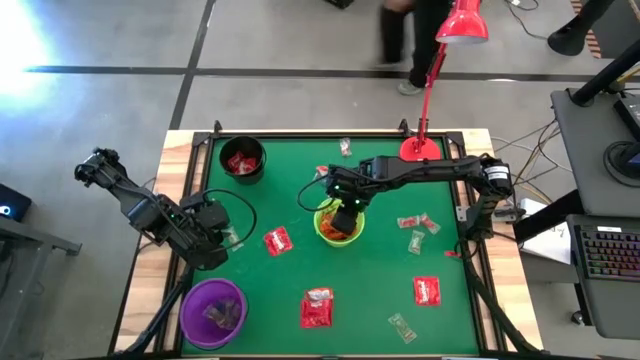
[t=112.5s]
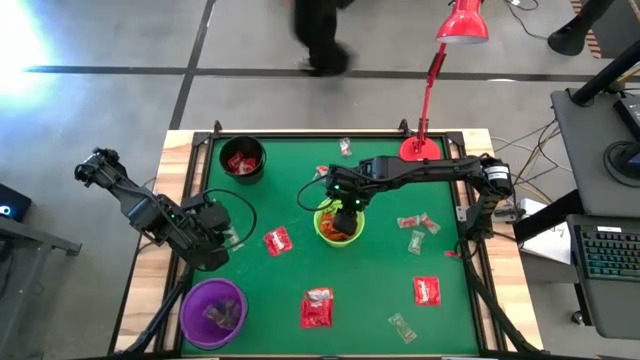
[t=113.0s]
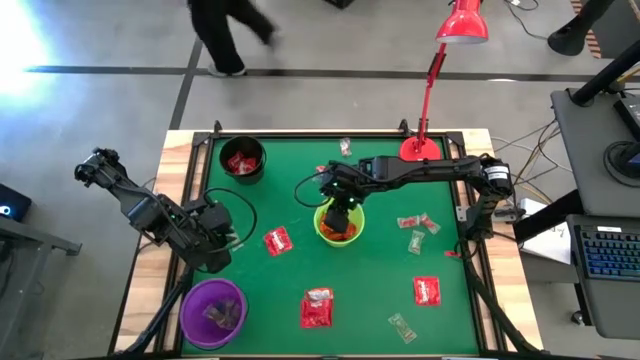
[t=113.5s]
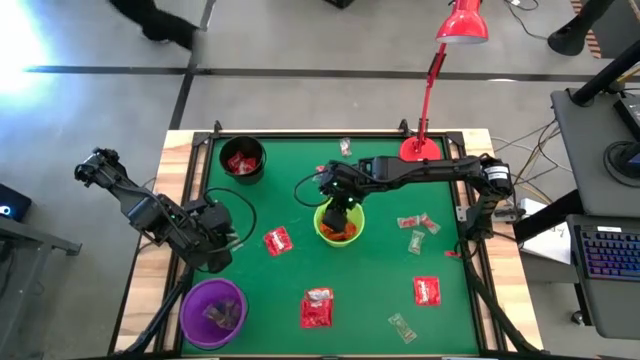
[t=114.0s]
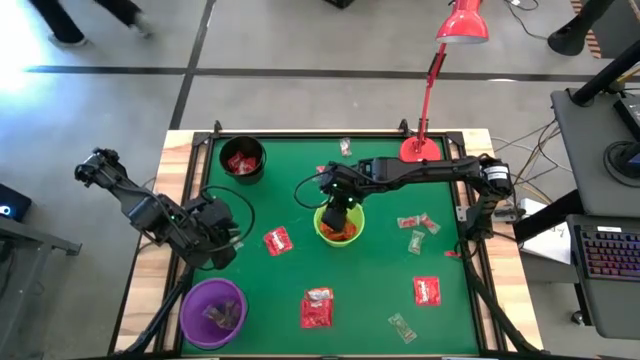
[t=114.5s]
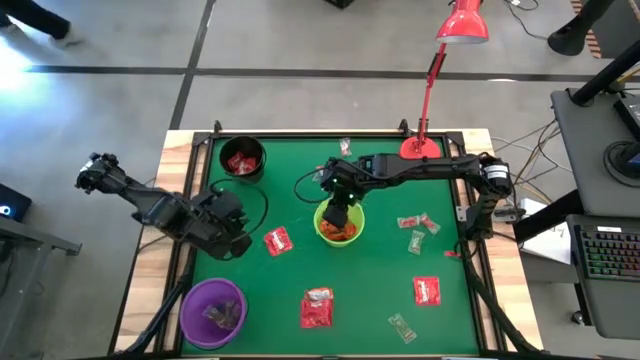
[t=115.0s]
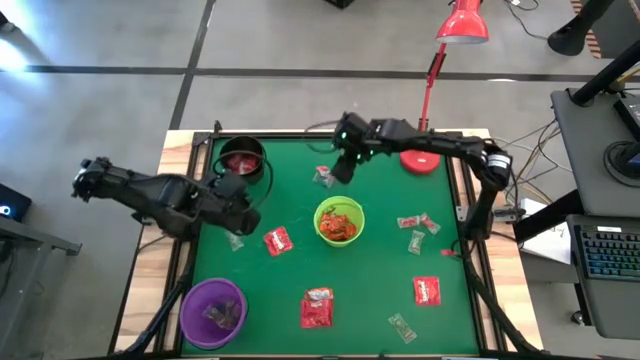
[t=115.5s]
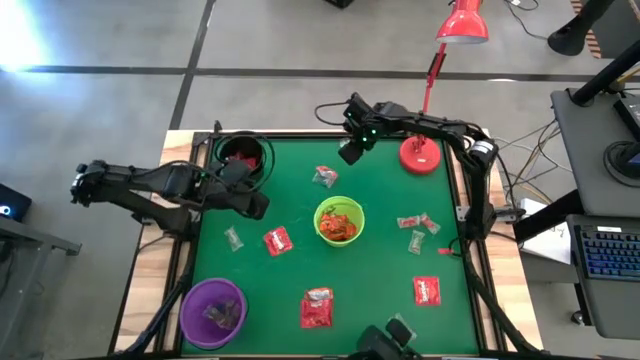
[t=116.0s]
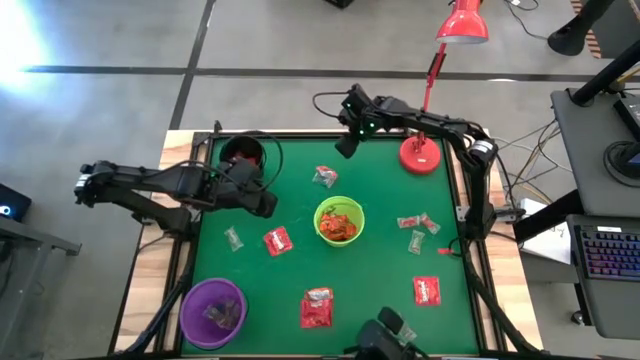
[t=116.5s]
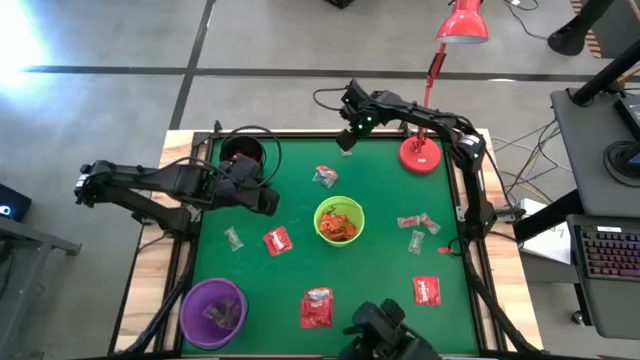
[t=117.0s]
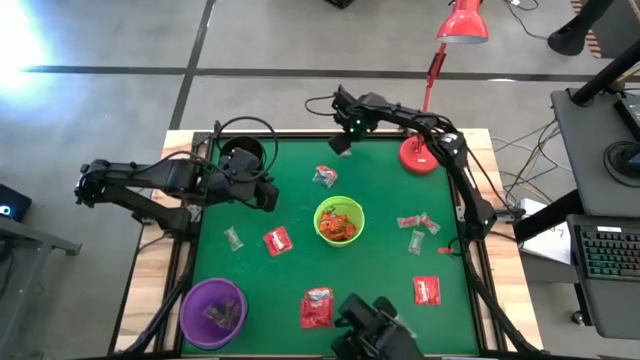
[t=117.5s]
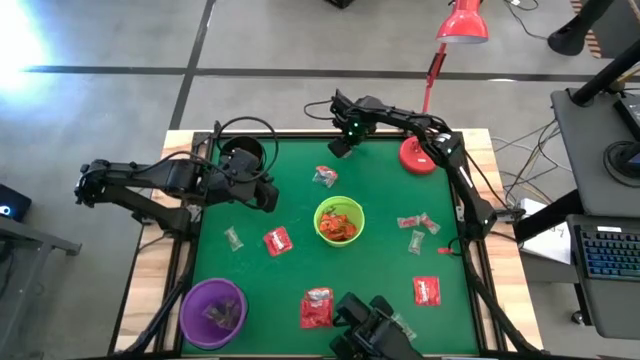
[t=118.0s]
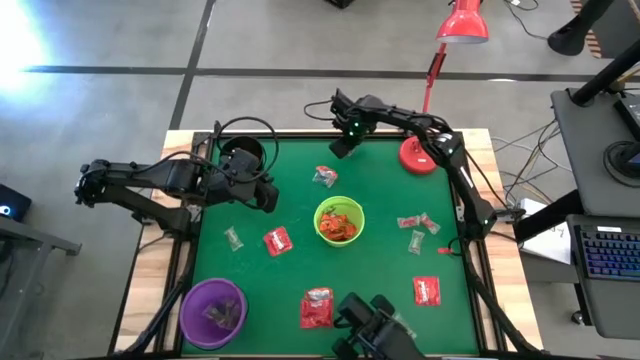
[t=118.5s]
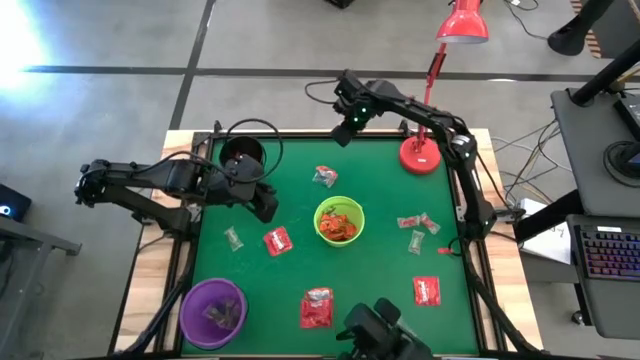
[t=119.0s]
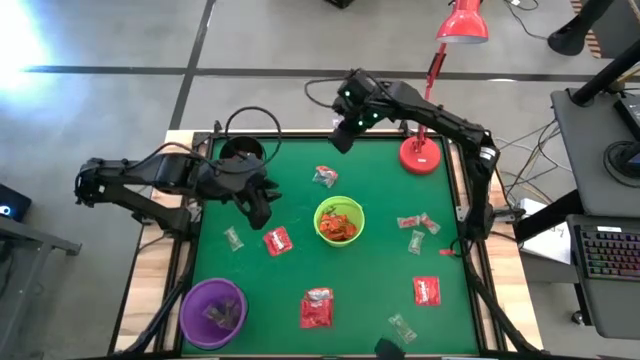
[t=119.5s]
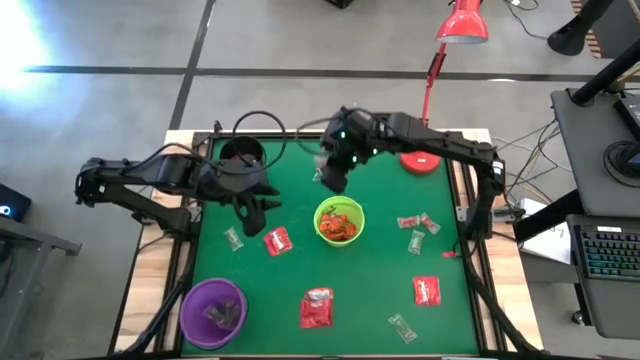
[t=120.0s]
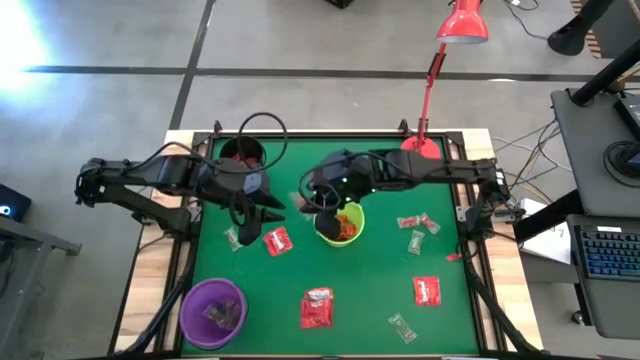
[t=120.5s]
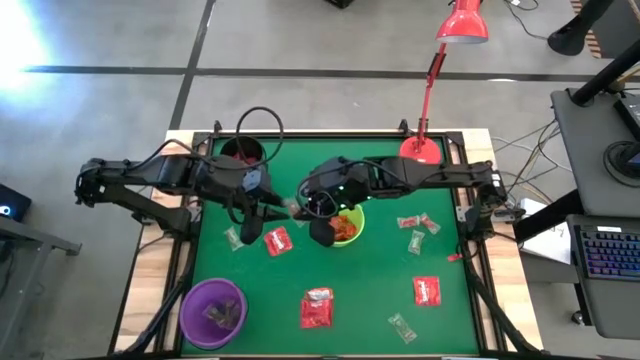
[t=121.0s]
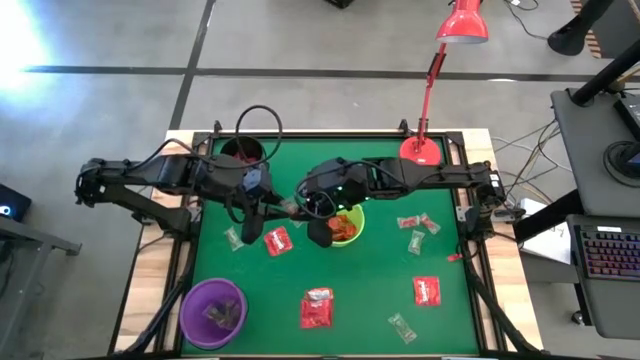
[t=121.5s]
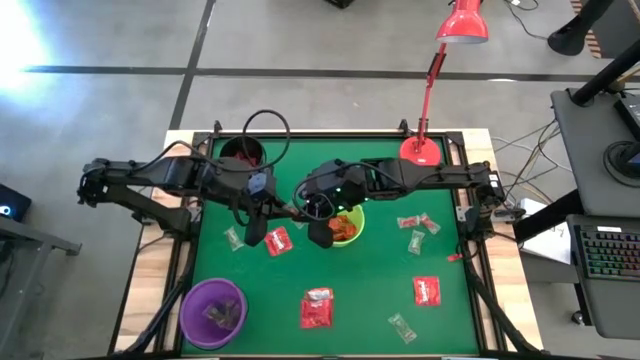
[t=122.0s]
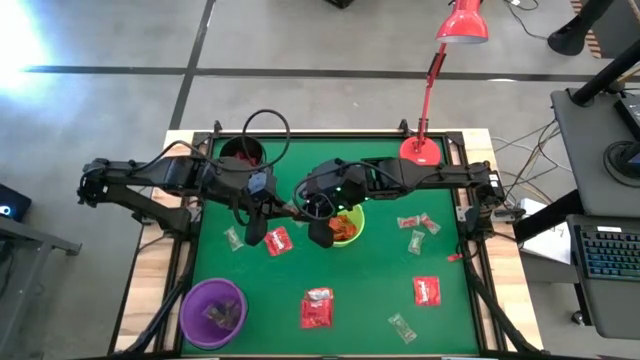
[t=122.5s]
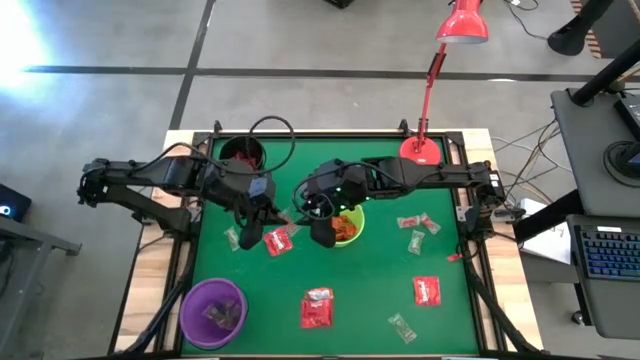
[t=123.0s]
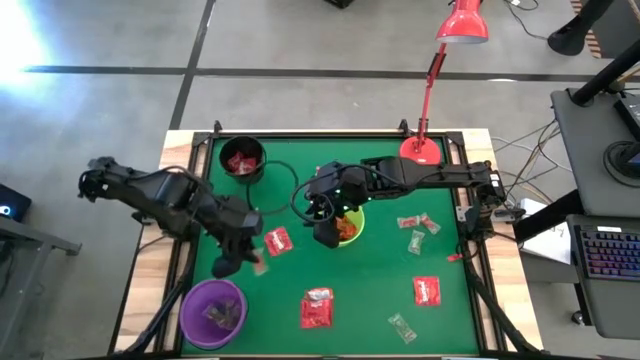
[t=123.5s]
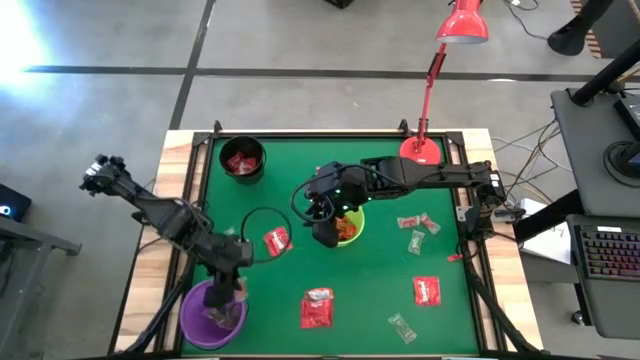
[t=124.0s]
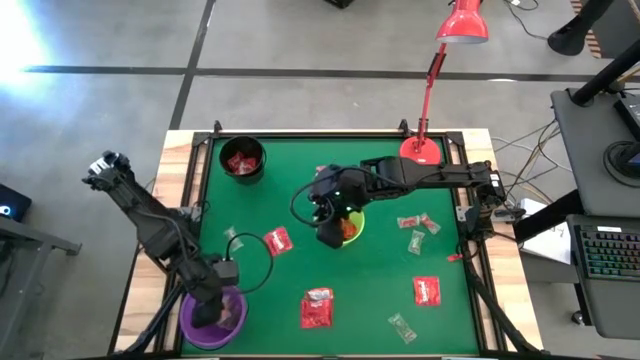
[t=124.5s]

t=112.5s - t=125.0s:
Task: Sort candy
Put the orange gummy into the purple bucket

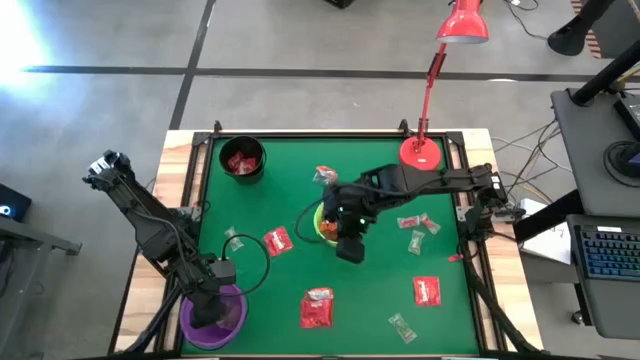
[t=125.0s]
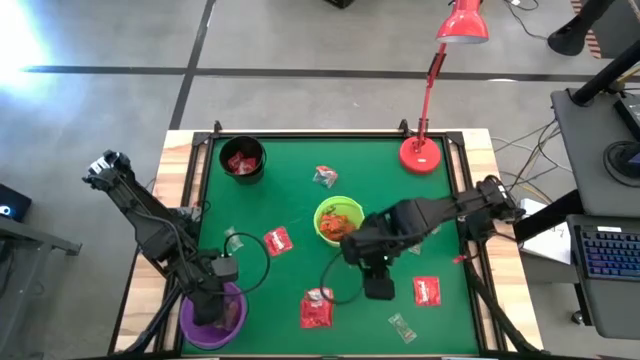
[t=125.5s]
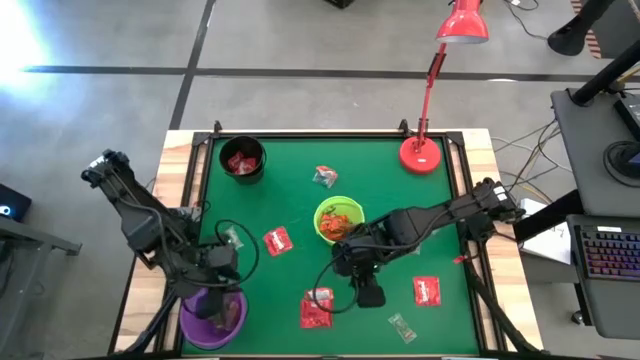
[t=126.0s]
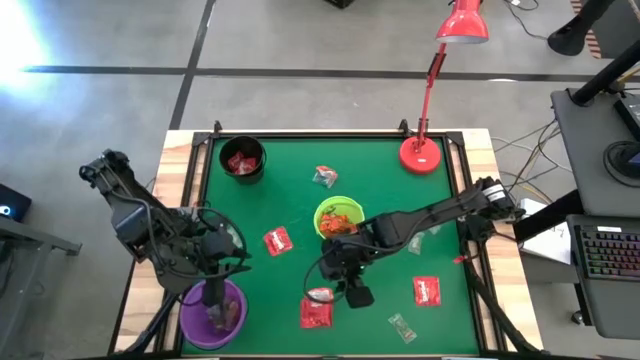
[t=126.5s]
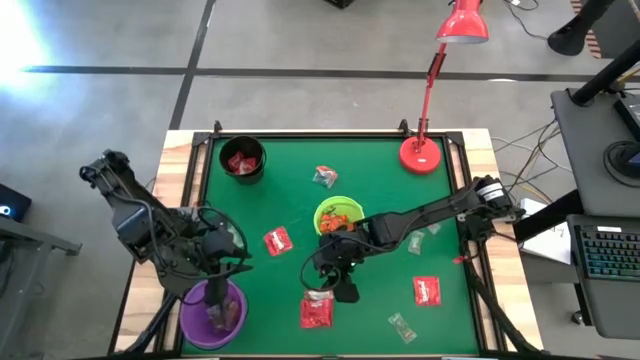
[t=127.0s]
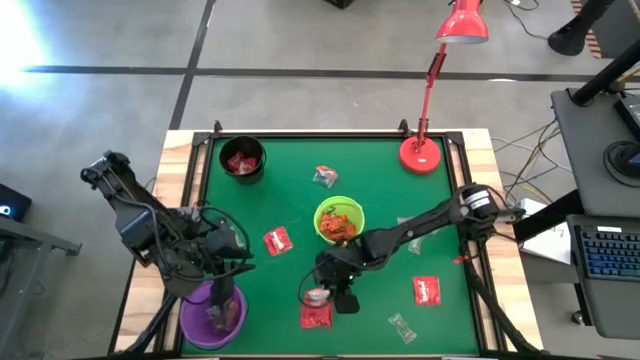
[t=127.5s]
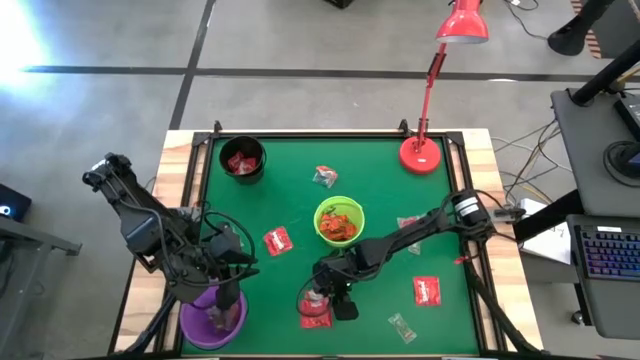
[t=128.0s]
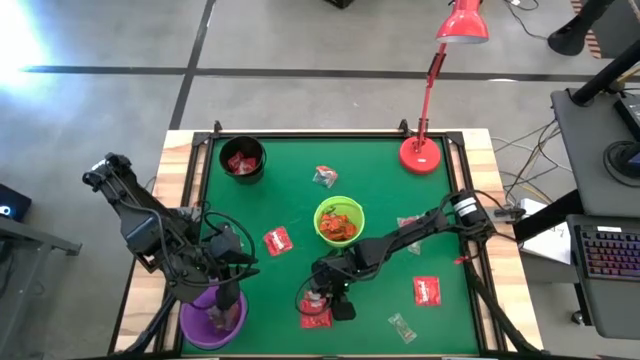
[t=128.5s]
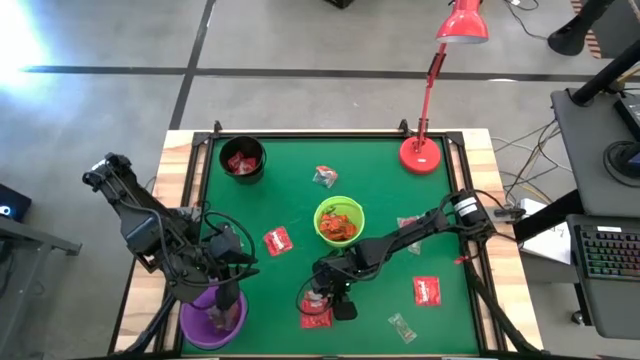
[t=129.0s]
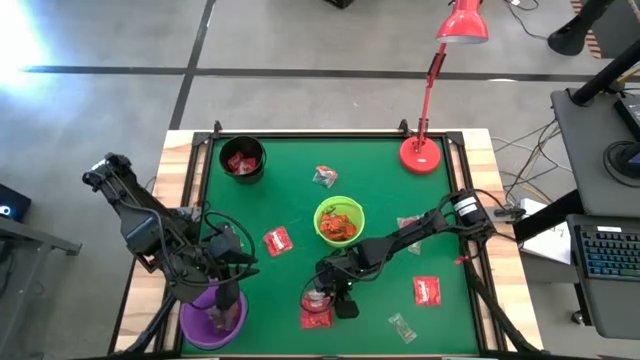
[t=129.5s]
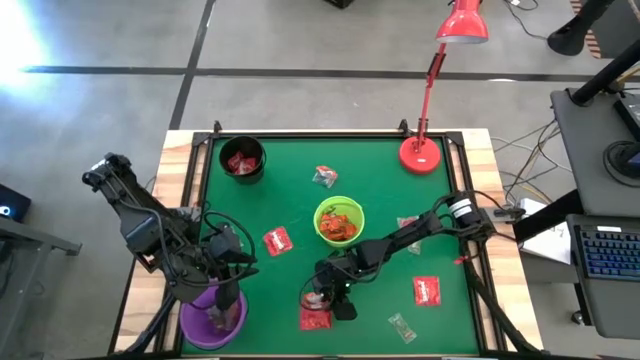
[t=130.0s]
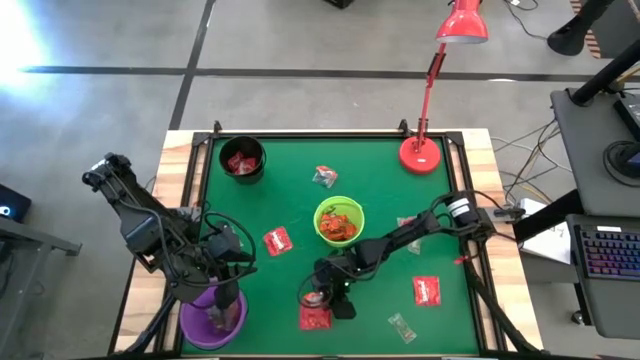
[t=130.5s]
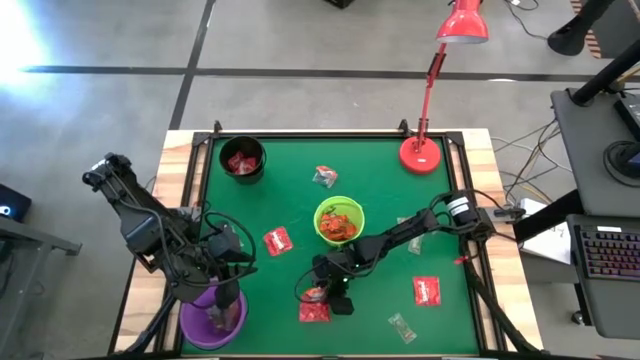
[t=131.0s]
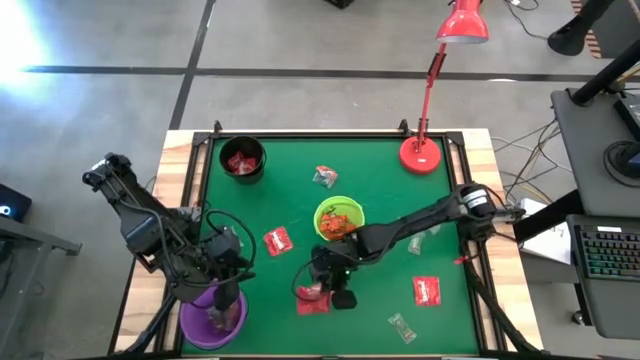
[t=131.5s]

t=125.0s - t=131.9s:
Put the red candy into the black bucket

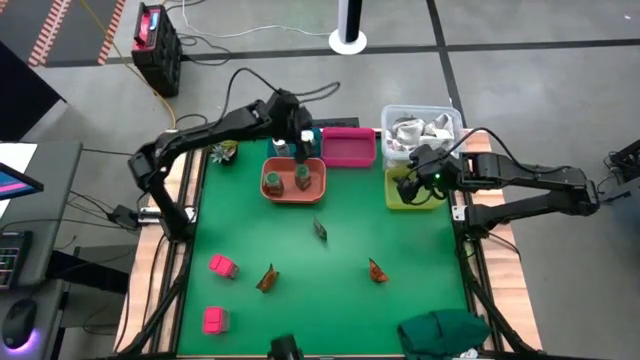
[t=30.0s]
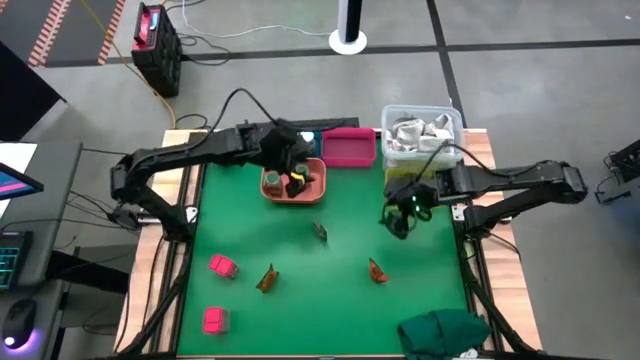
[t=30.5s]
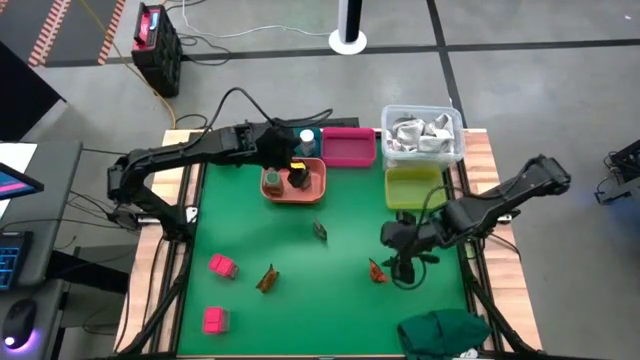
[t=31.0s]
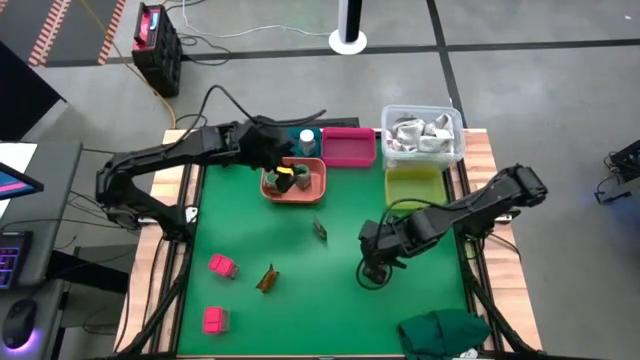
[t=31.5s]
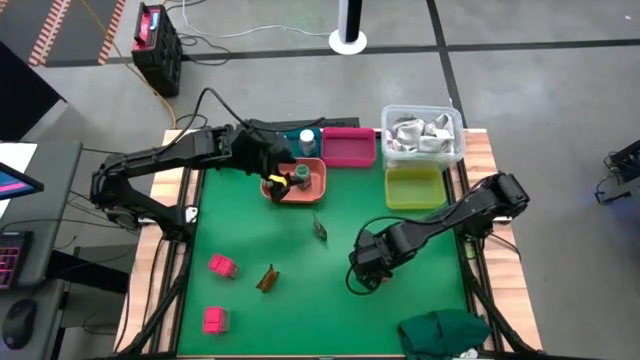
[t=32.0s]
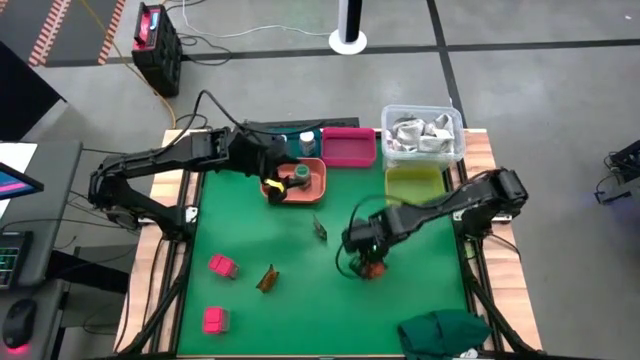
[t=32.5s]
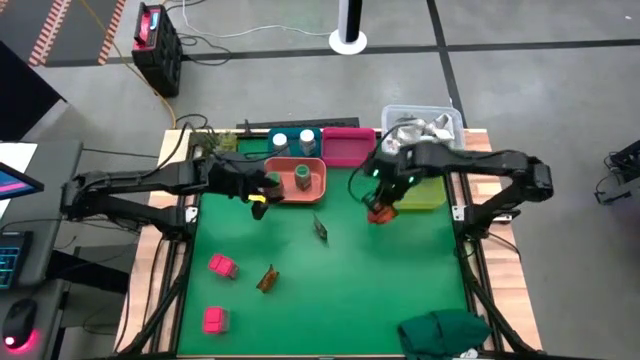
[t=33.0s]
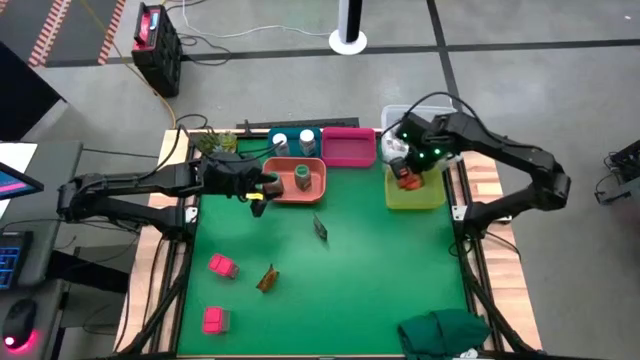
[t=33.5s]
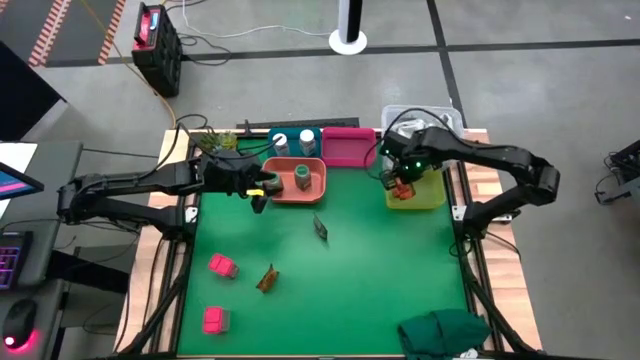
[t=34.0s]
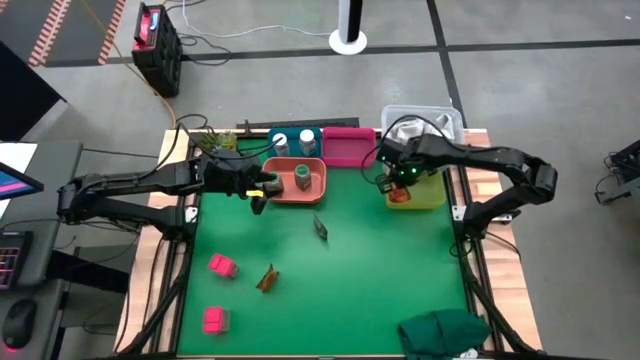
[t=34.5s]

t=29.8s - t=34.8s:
Task: Sort spices by type
Put the bottom right orange seasoning pack into the yellow bin
